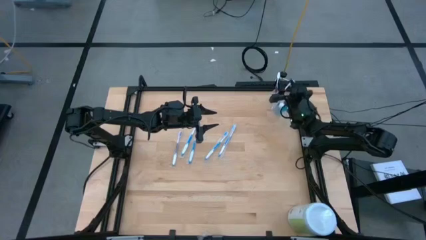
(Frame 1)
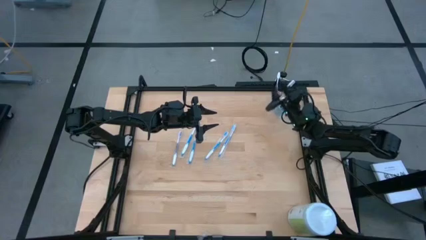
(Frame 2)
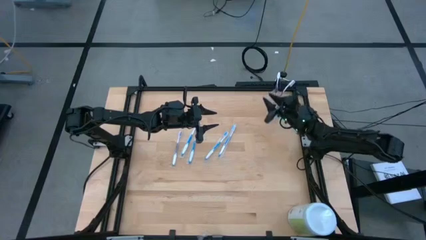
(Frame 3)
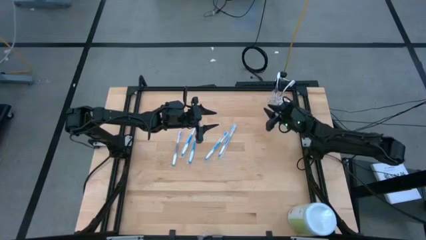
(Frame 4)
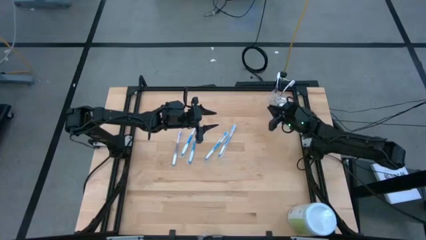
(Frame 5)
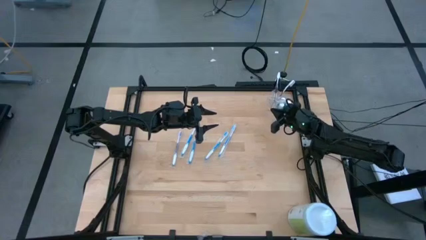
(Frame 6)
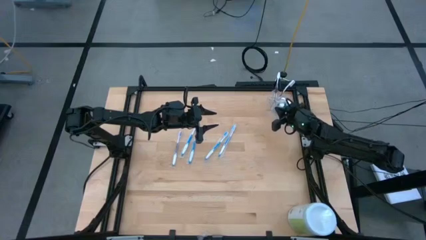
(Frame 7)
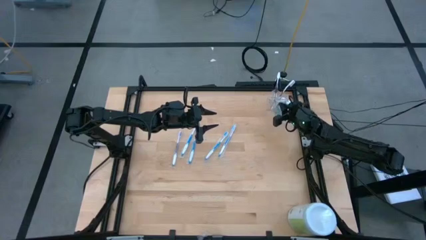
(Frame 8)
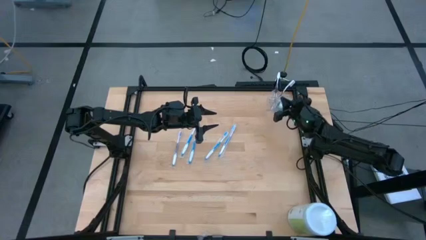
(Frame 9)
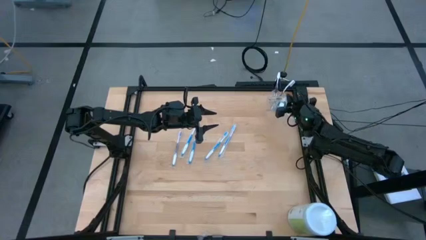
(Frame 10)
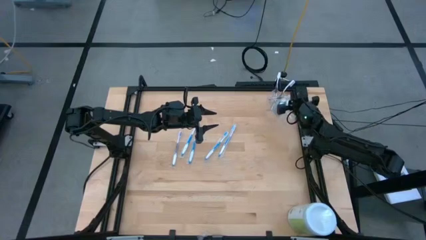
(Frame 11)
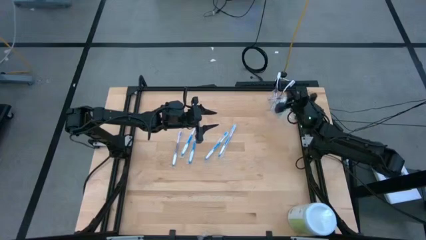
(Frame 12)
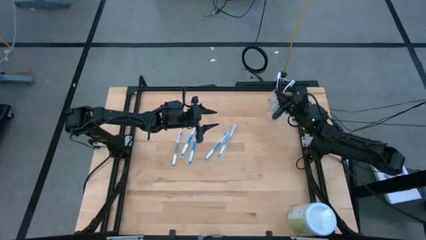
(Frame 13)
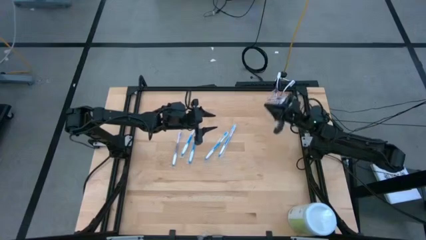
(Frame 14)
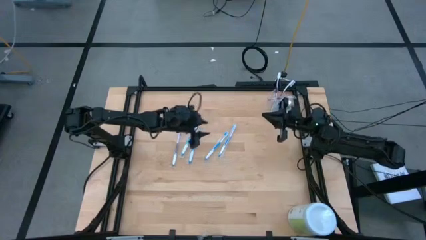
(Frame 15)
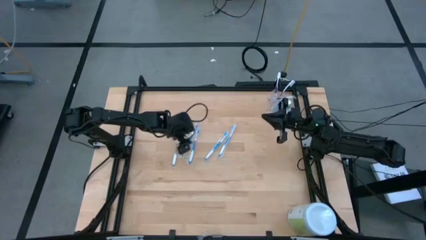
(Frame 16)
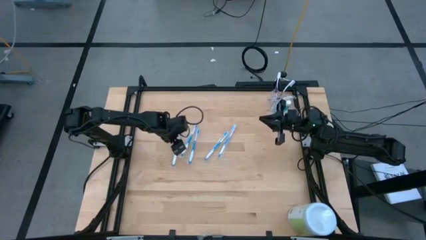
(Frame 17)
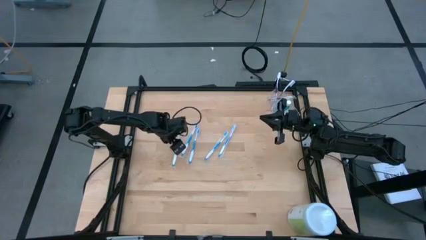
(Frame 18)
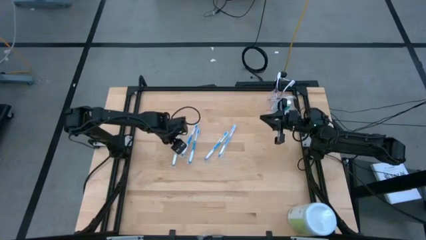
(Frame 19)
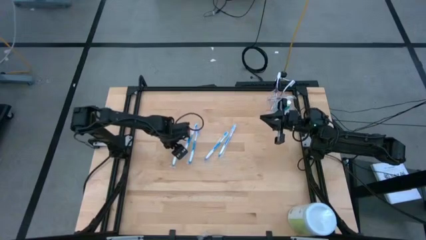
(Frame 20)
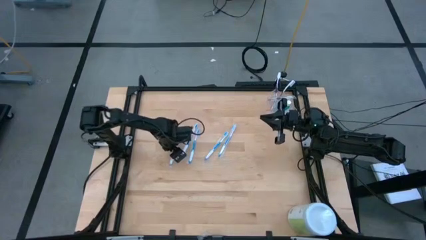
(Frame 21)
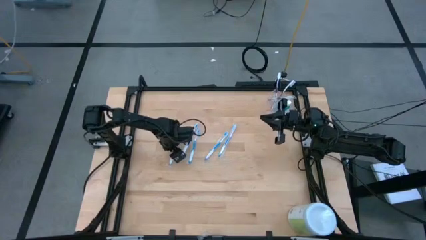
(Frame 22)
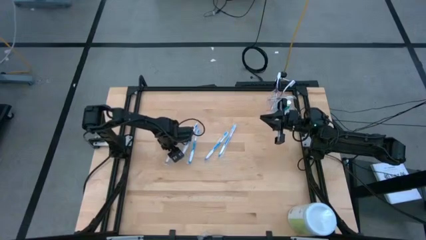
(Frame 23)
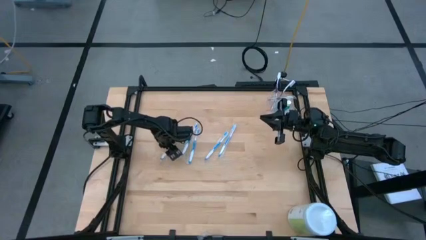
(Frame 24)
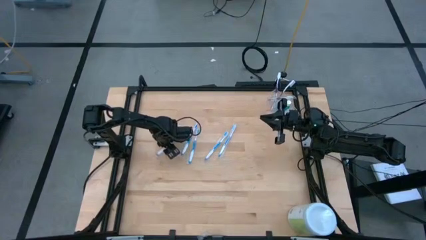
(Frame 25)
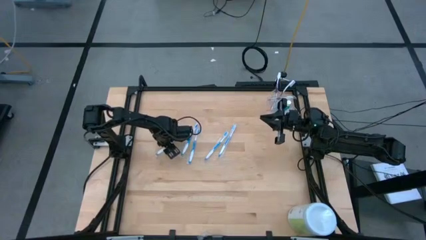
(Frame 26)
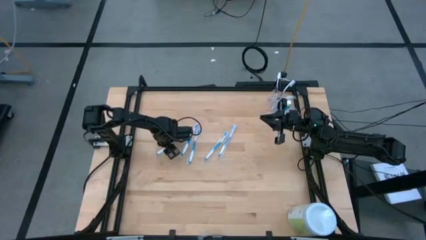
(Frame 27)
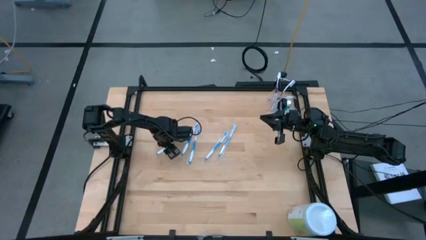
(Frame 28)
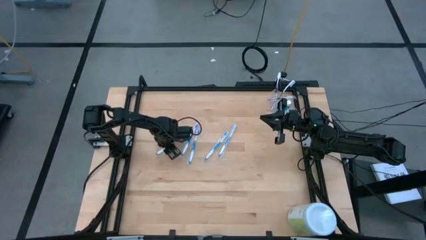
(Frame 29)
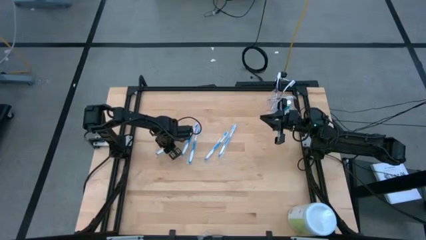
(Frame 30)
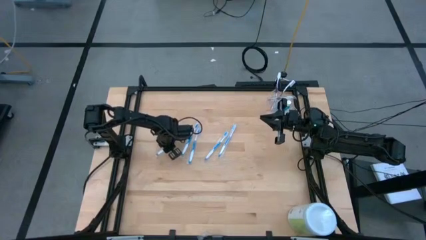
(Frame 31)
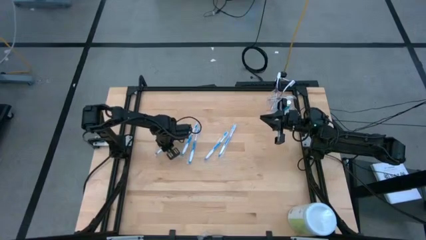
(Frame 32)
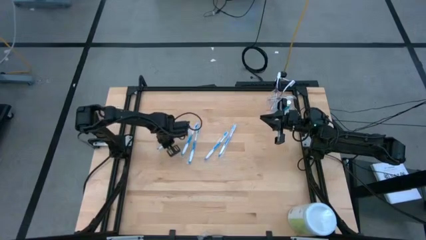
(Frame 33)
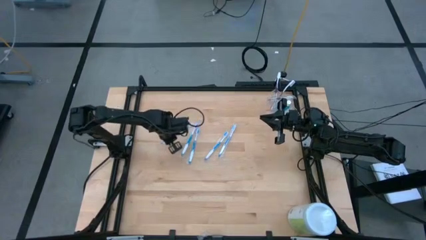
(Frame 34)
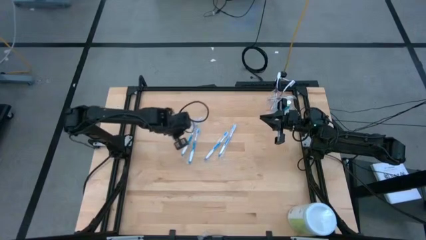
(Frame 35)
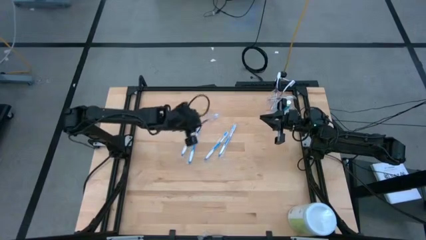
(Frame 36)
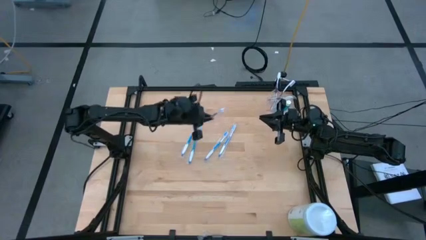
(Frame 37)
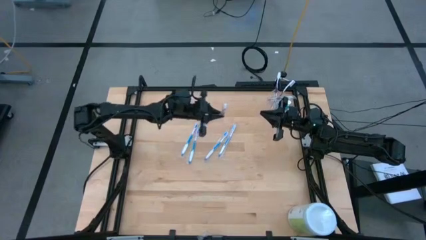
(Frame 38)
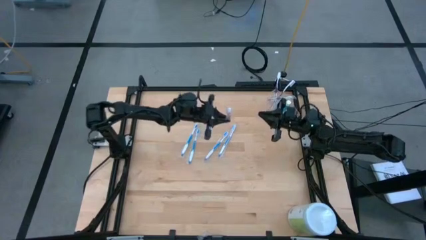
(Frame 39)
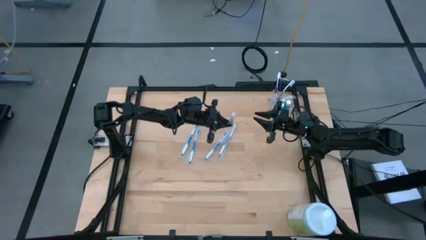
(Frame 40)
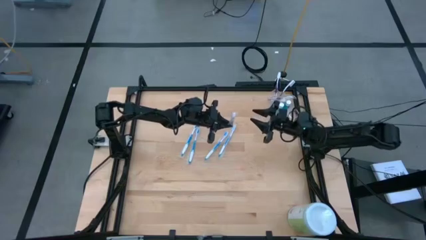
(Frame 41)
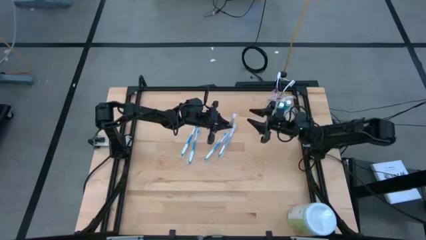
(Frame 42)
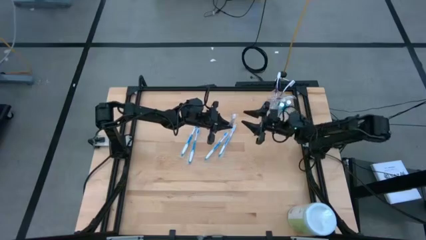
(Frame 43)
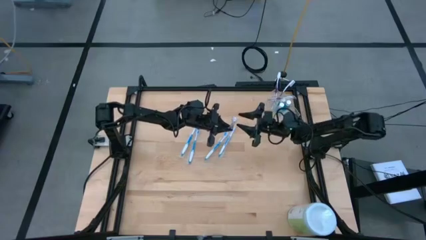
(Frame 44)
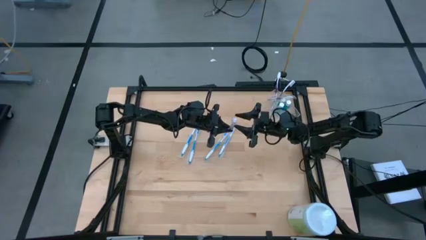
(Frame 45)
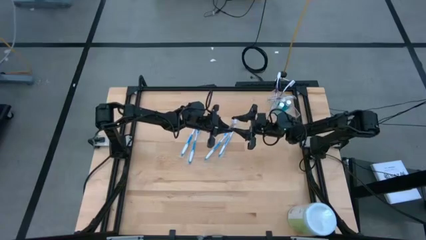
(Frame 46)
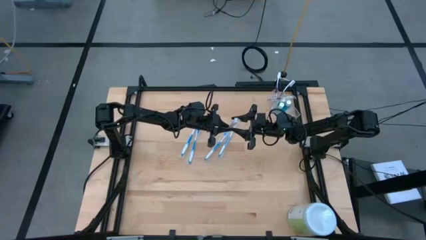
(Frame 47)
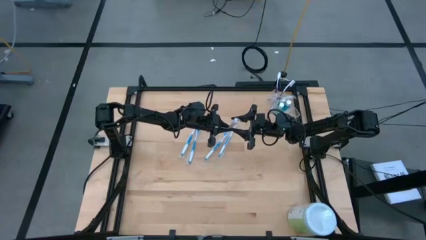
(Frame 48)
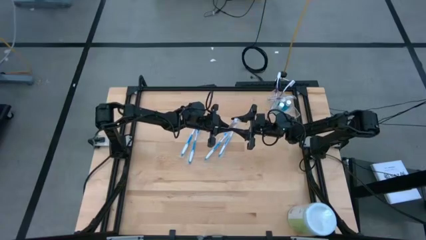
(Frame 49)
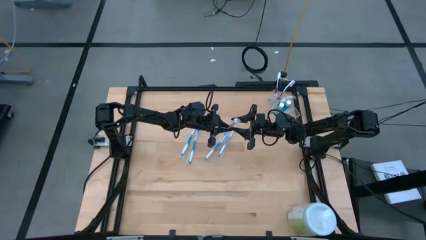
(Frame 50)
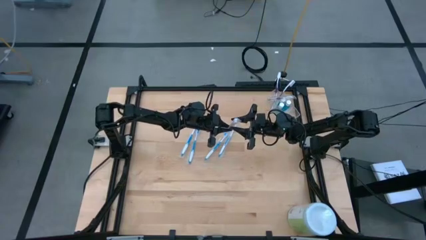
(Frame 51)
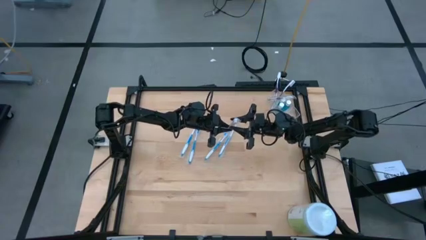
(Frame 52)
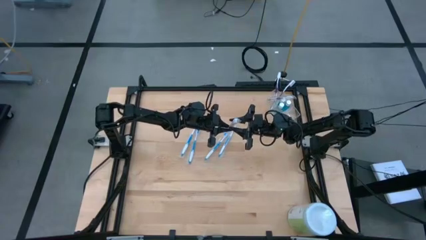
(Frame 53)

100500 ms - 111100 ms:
Task: Pick & Place toothbrushing station
Put the violet toothbrush into the left of the transparent organizer
